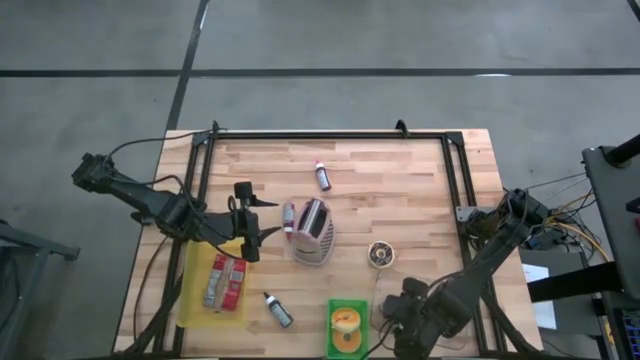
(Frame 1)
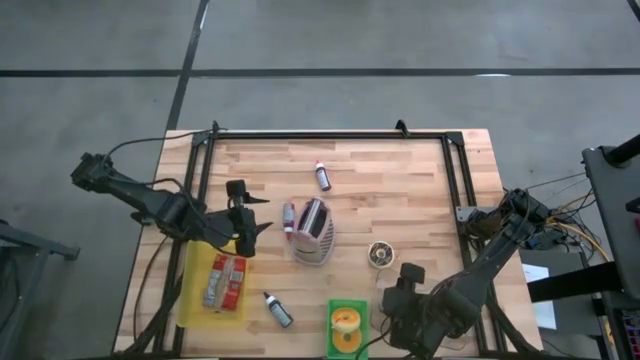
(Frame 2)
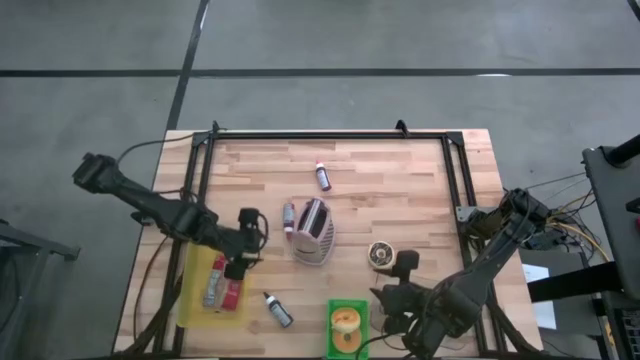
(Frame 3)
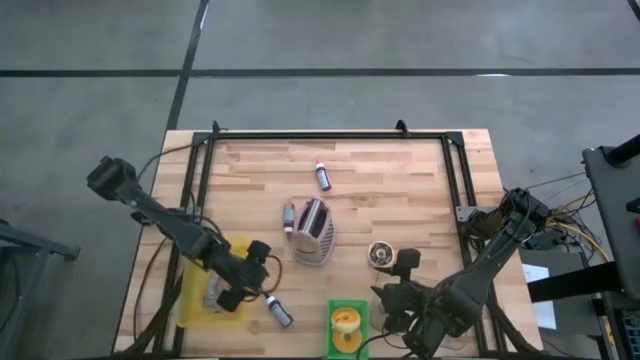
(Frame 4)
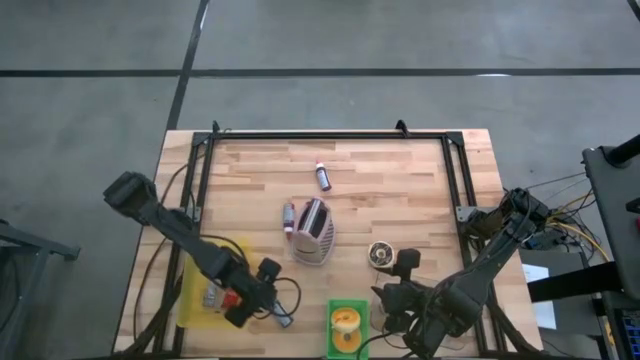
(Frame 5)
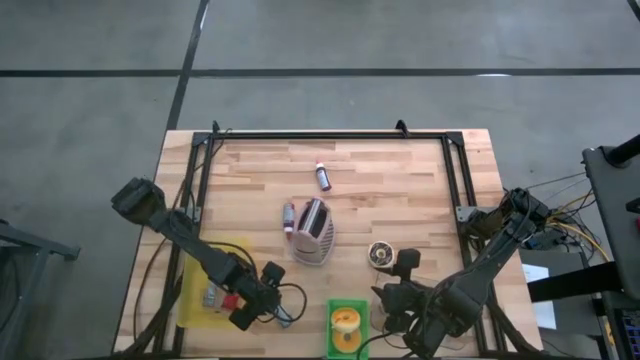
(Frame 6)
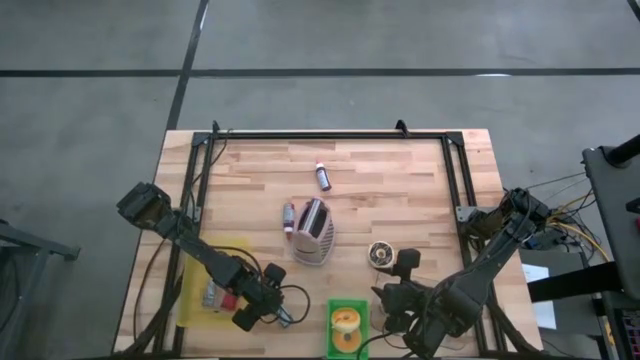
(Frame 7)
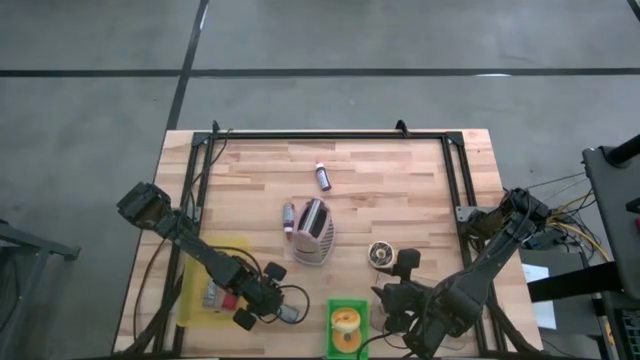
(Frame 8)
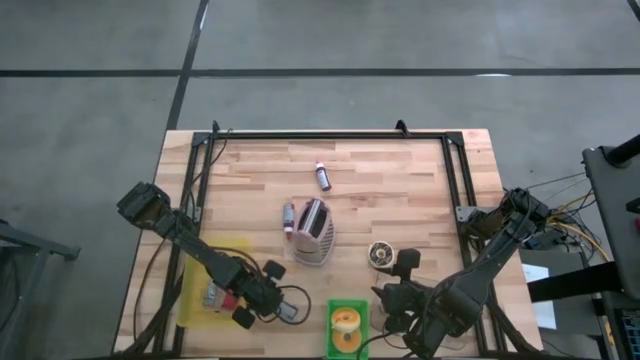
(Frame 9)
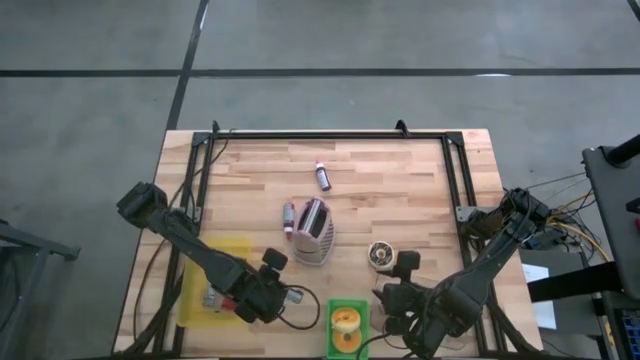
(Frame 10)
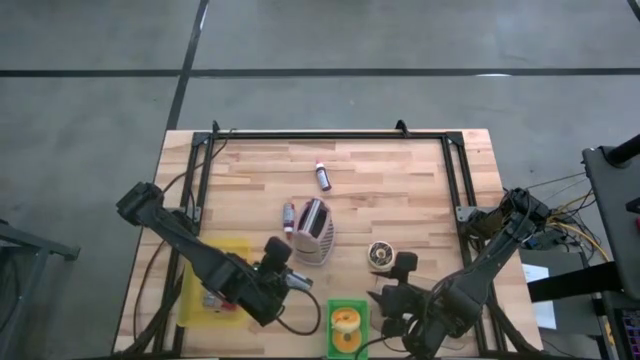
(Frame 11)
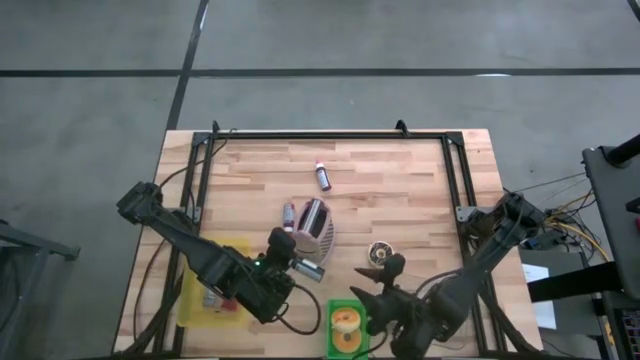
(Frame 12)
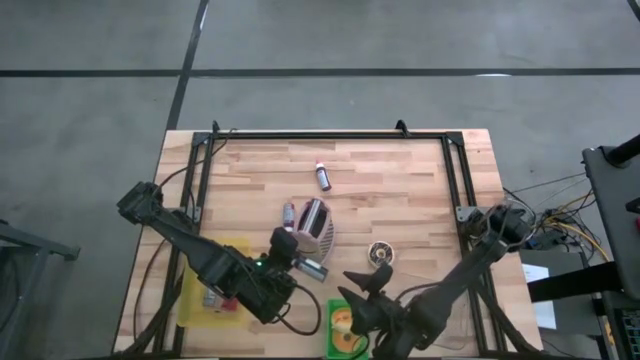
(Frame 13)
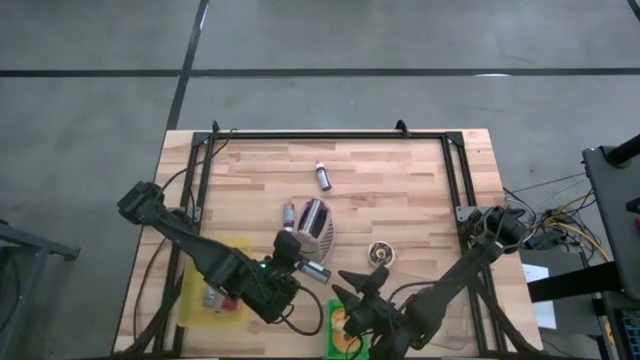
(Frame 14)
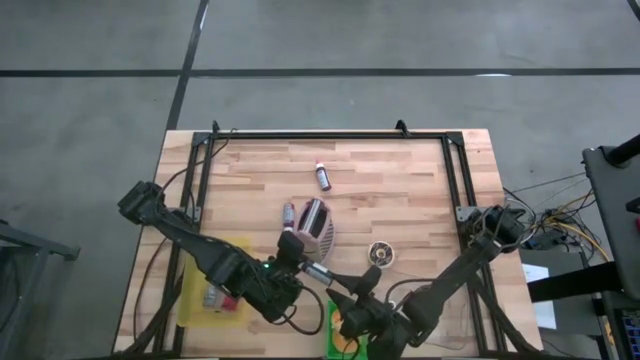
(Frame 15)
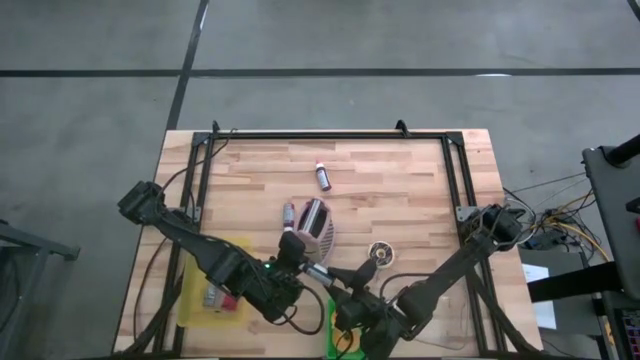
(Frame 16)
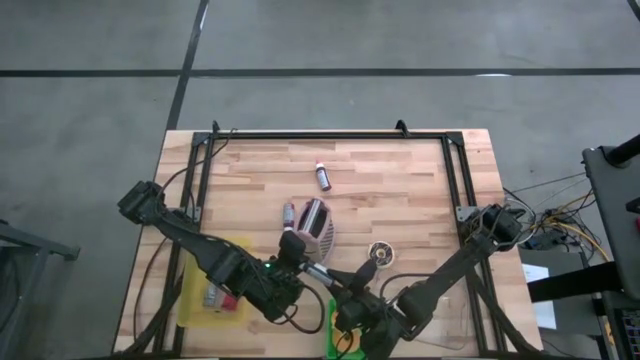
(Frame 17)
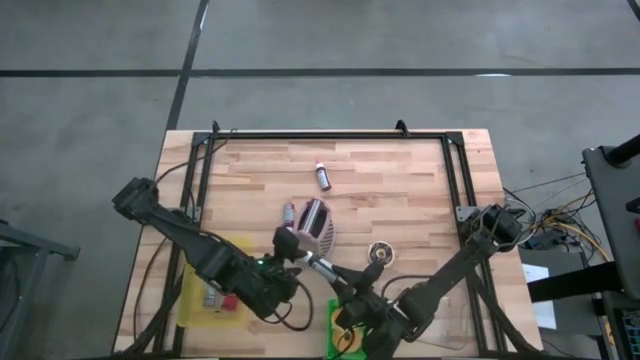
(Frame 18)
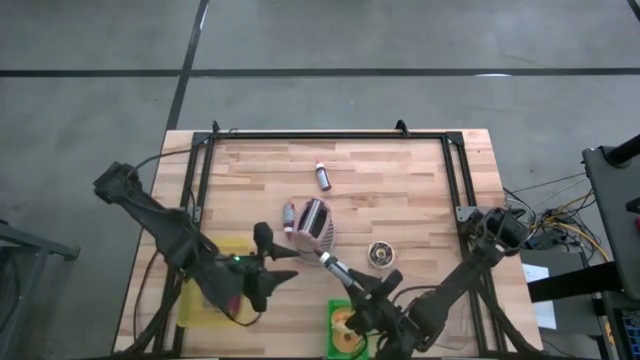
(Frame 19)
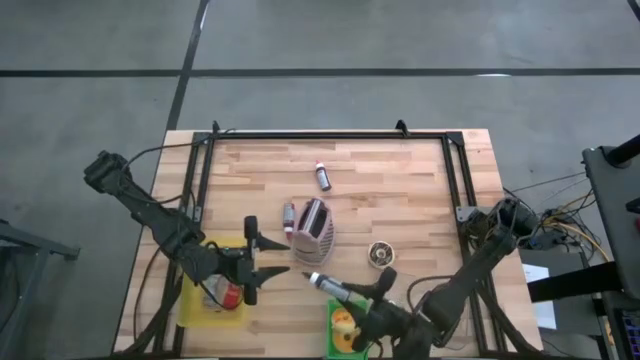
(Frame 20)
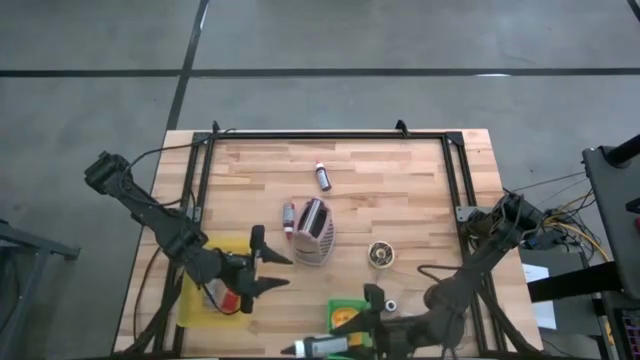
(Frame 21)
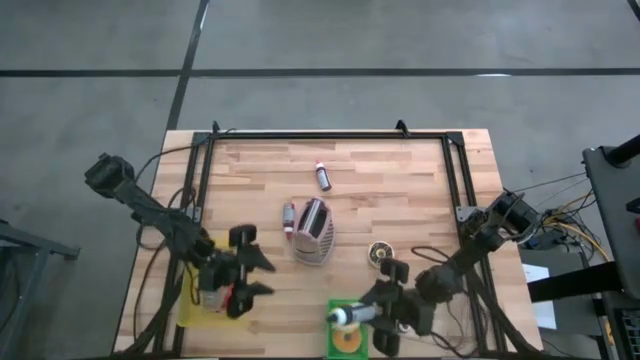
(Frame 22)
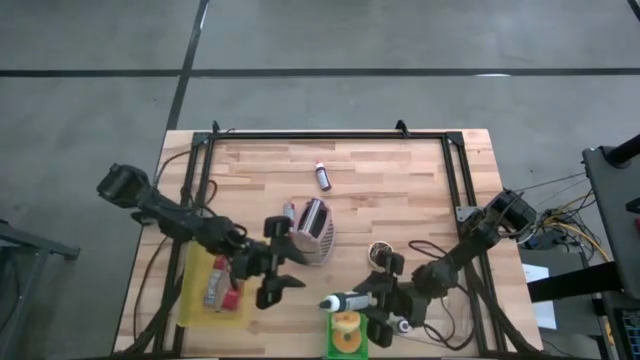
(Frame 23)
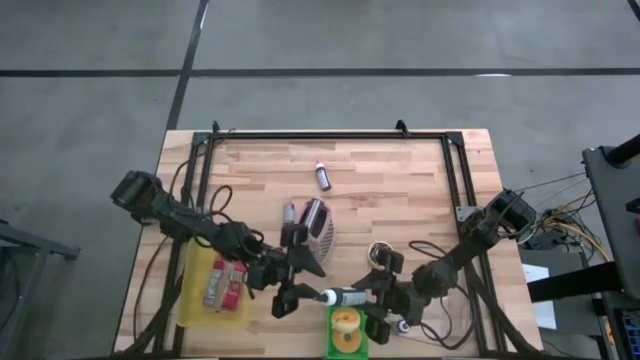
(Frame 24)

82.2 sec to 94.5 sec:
Task: Pick & Place Food Item
Put the black food coloring bottle into the transparent bin

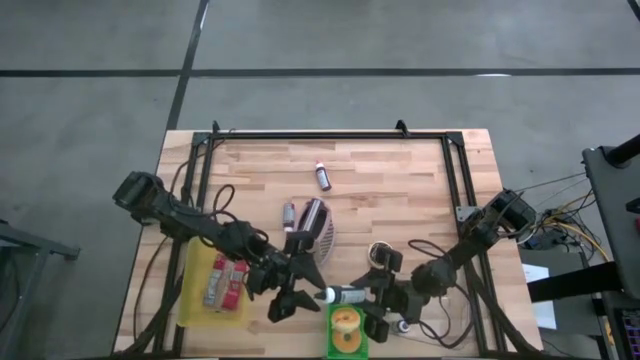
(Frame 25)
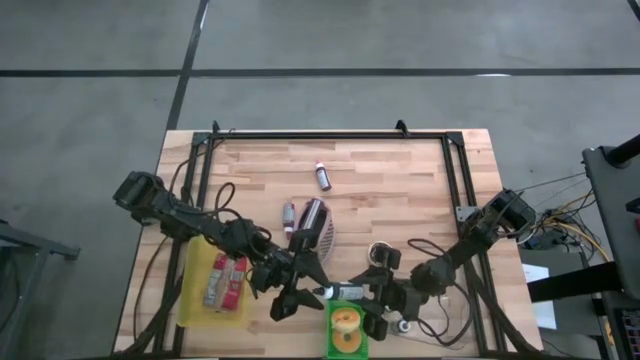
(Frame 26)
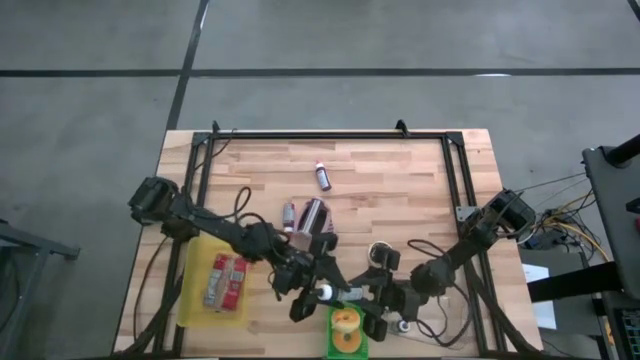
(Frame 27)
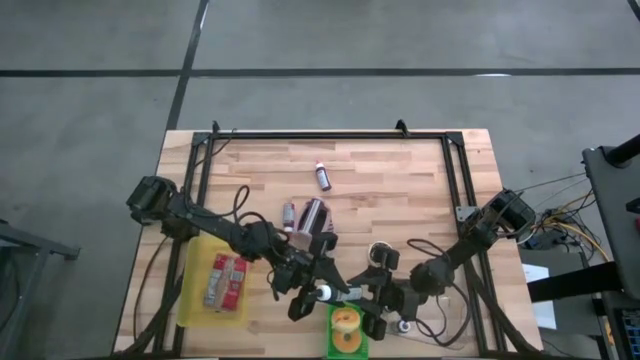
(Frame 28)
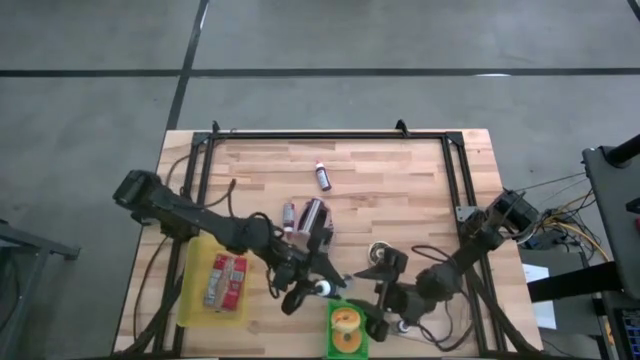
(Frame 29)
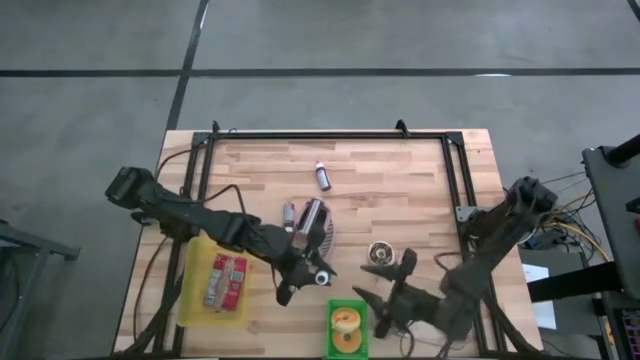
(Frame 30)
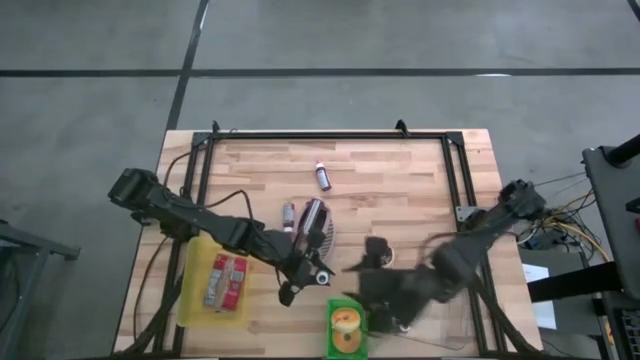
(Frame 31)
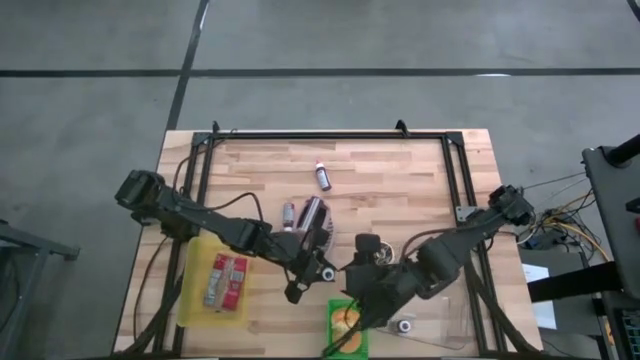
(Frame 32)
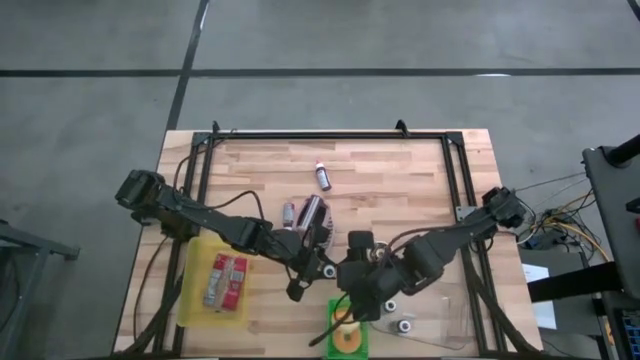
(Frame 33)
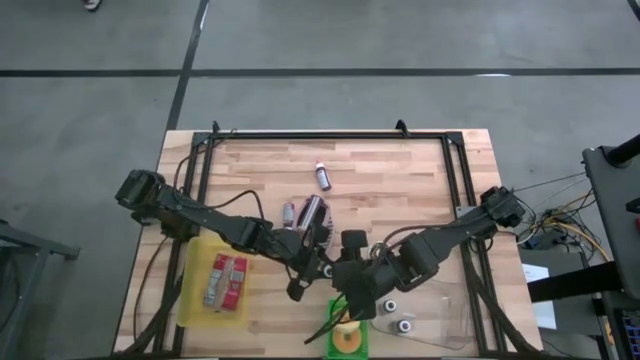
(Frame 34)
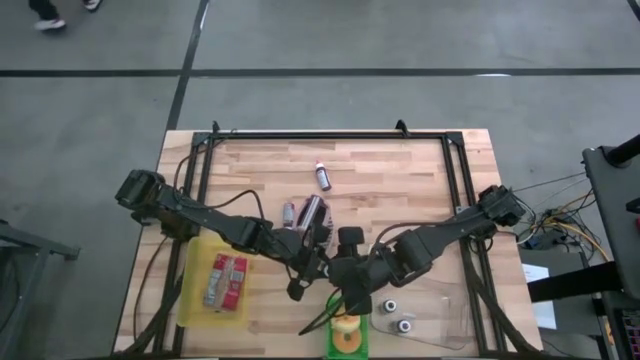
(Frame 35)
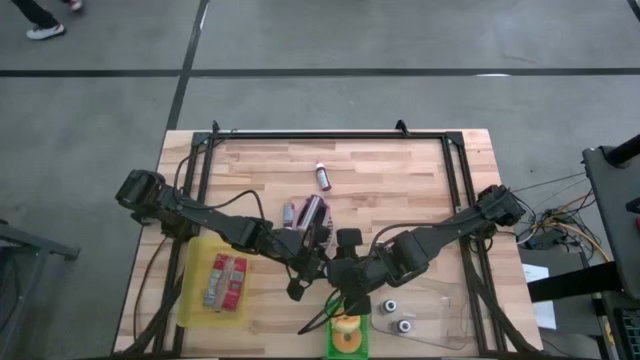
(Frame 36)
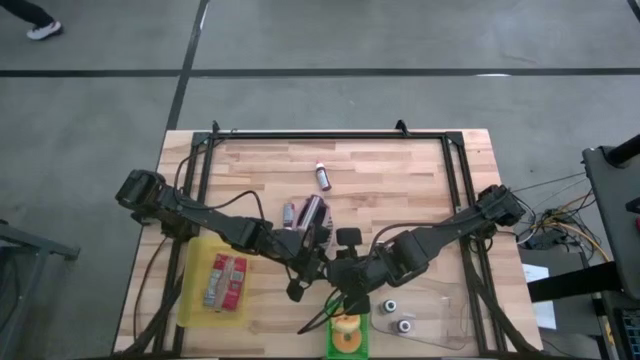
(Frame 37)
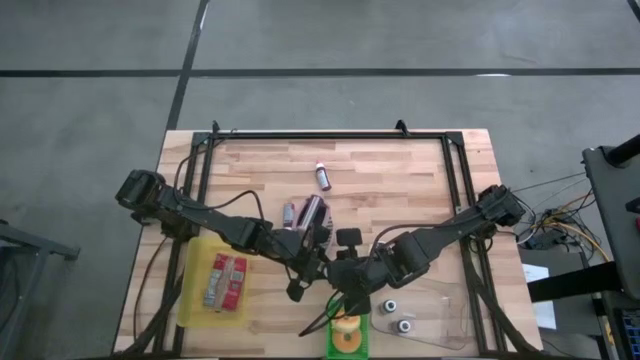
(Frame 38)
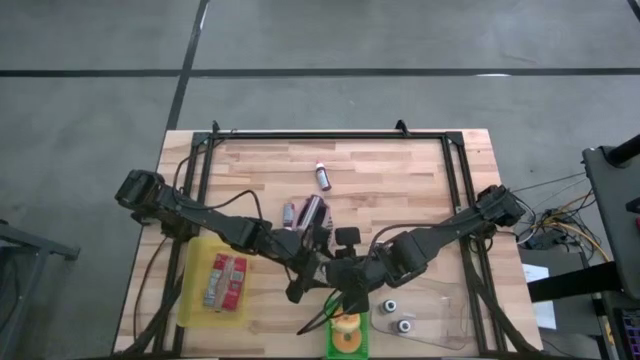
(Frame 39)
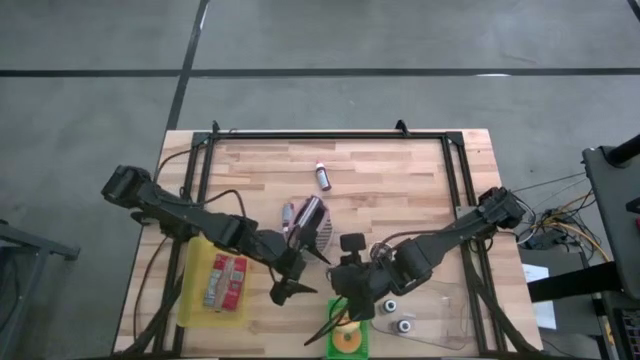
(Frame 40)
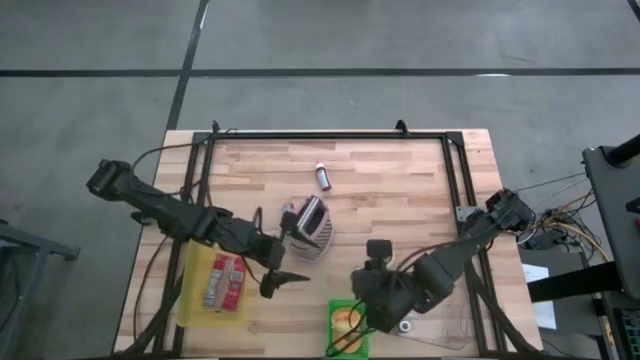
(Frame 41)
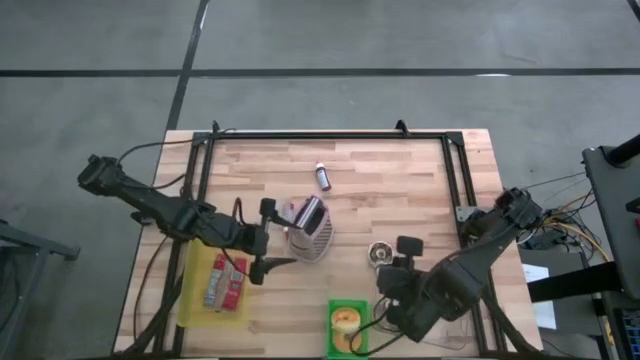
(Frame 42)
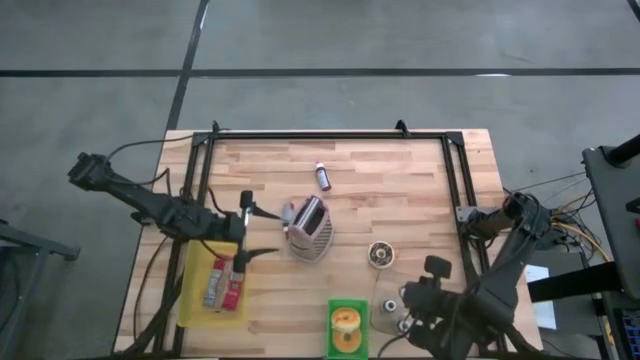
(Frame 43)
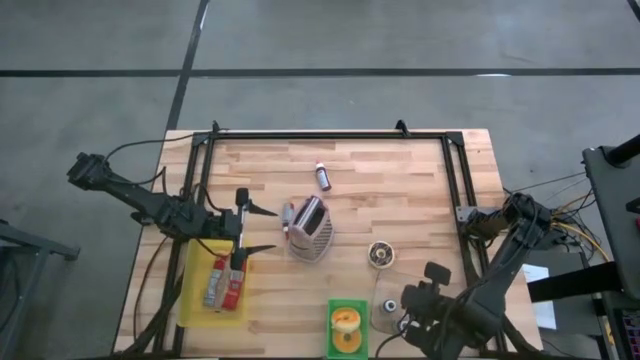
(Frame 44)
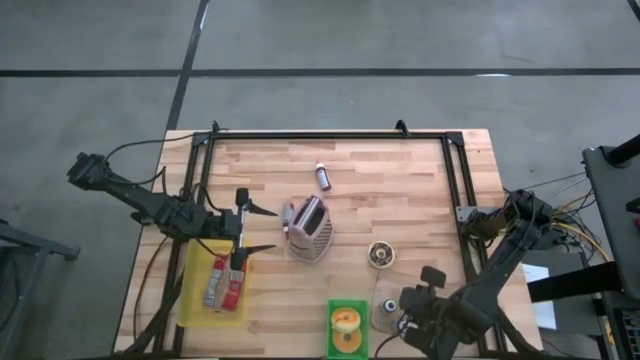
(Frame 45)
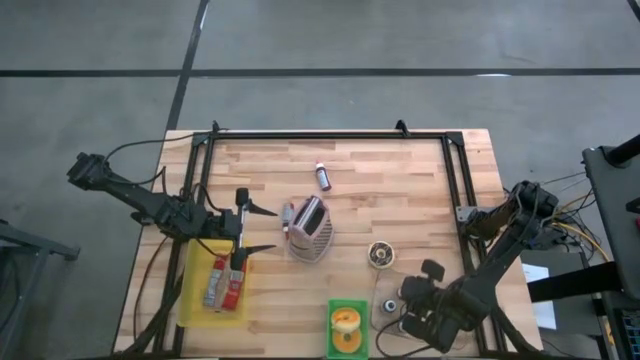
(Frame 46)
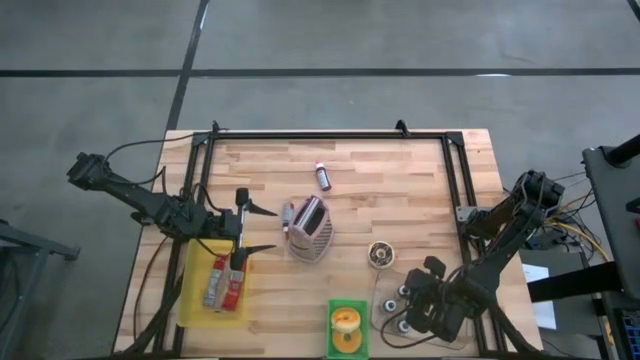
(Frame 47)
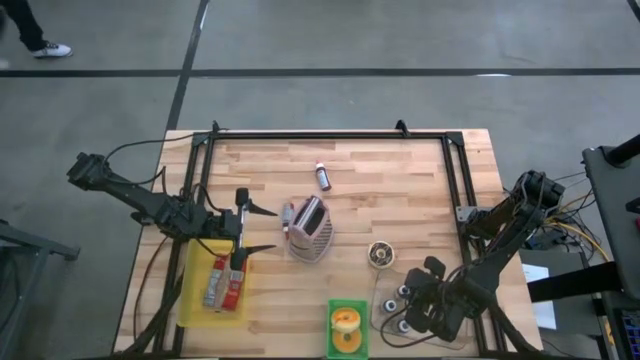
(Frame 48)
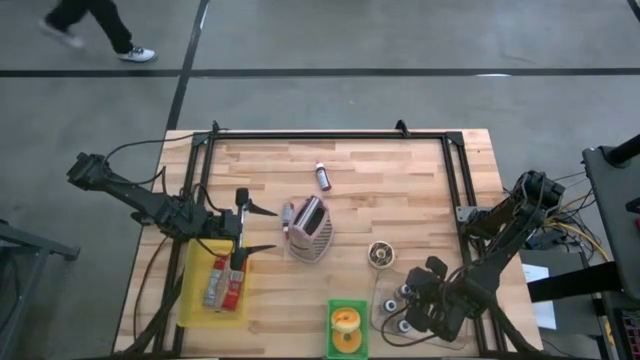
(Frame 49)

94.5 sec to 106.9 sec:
Put the black food coloring bottle into the transparent bin
